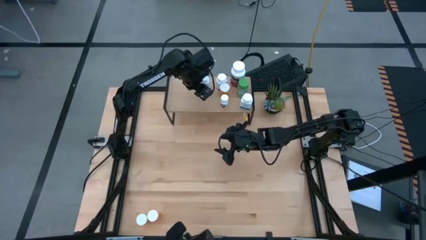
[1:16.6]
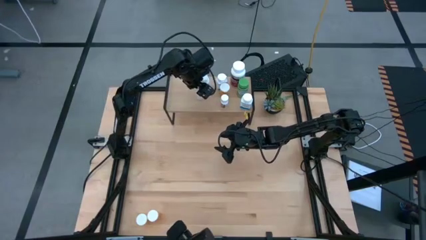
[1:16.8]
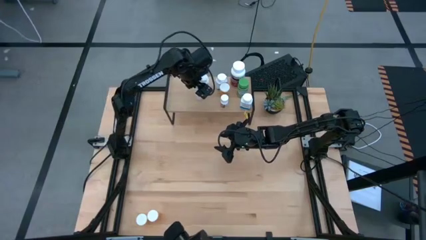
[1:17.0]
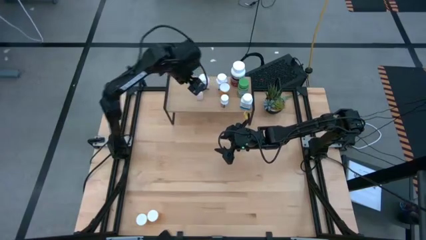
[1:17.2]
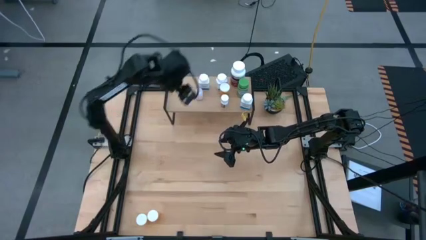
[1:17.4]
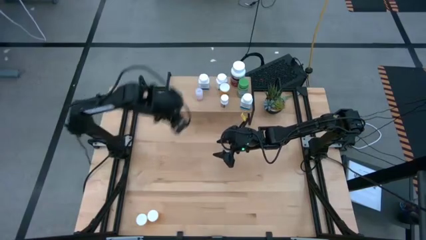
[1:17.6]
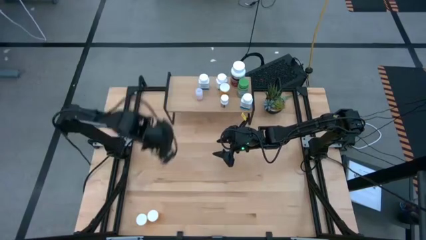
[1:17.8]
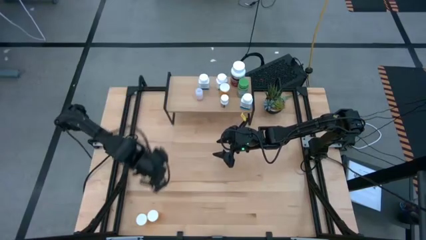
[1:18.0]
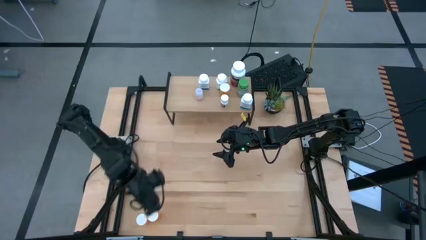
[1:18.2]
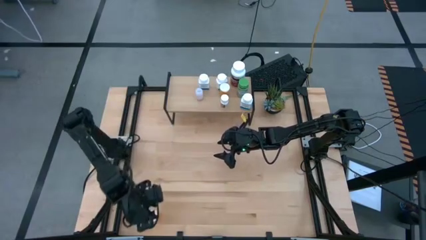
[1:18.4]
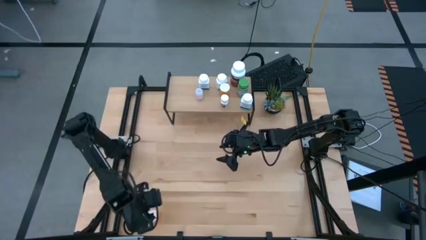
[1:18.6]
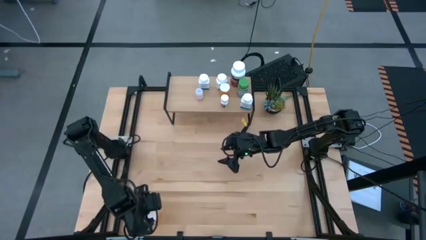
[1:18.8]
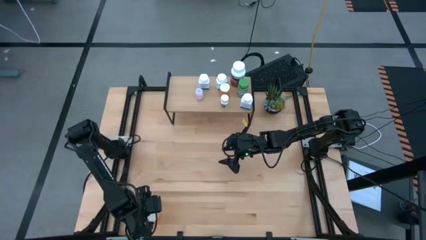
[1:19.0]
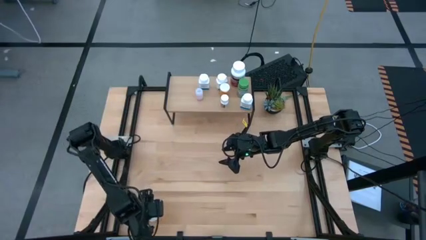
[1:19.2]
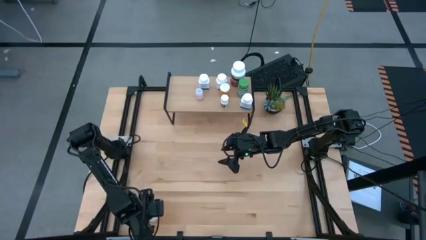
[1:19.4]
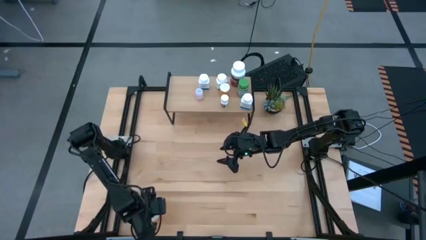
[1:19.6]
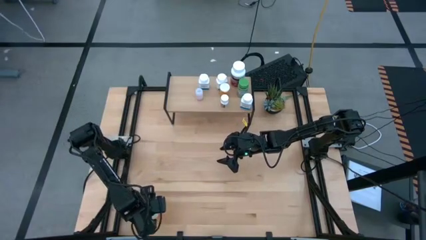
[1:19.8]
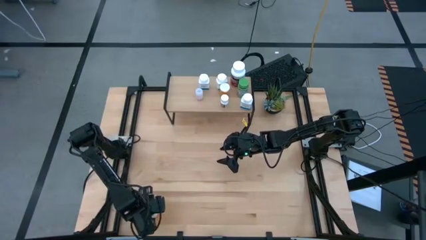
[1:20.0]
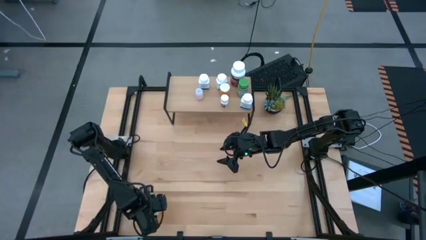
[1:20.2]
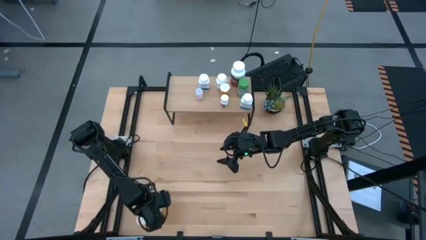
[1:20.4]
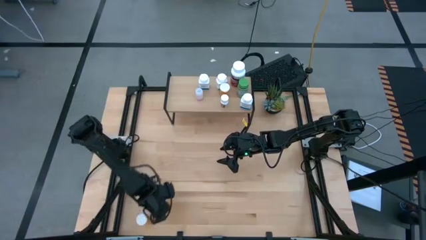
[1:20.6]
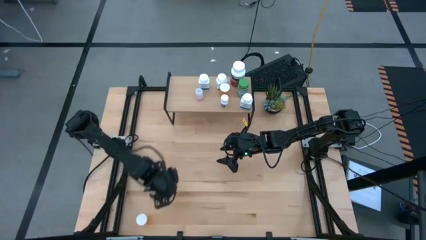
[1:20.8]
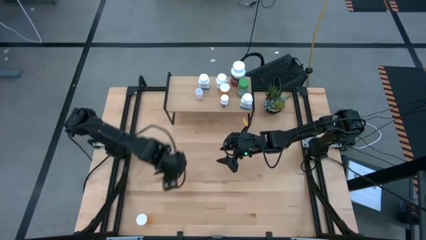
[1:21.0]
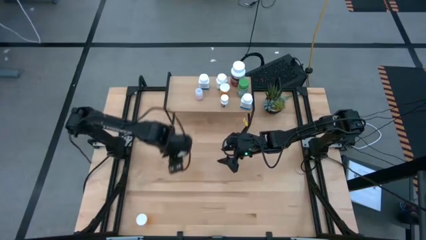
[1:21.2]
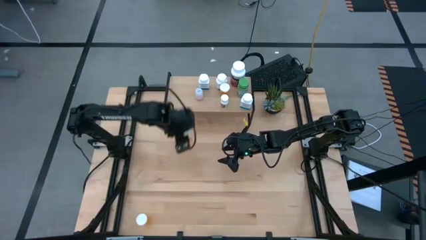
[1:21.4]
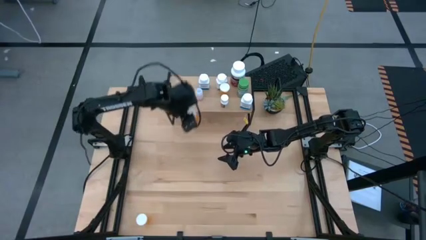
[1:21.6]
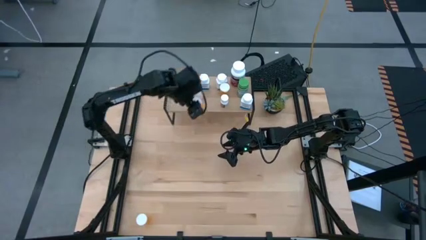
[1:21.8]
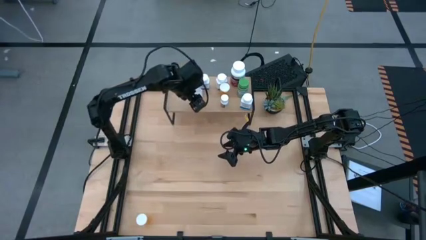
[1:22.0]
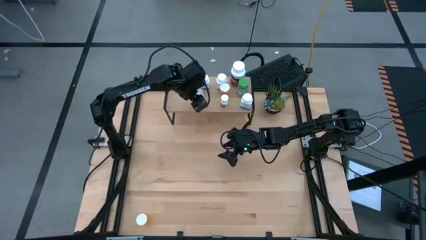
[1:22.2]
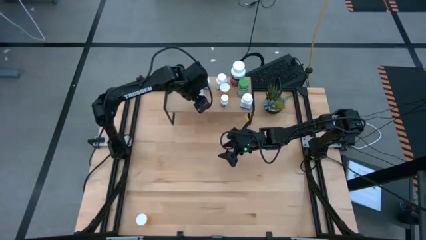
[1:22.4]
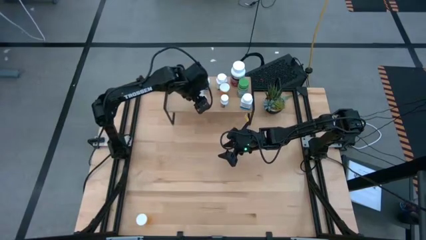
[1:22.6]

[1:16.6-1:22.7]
Task: Pick and place medicine bottles onto shelf by color
Put the right orange pill bottle on the shelf

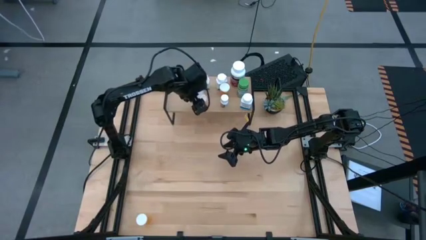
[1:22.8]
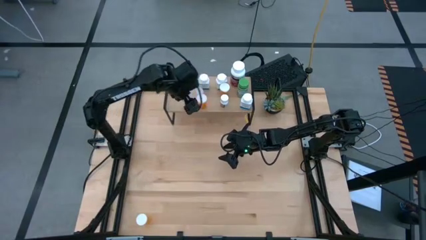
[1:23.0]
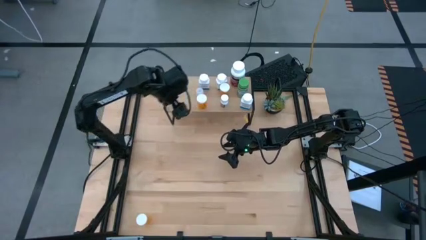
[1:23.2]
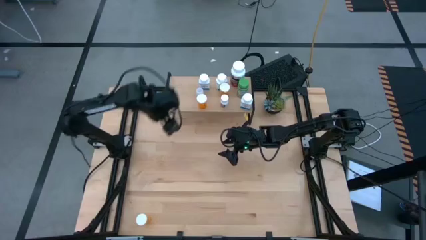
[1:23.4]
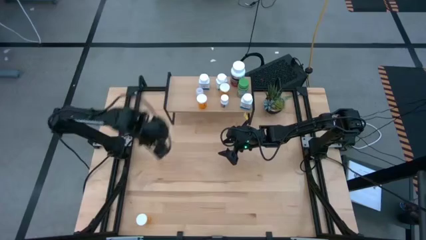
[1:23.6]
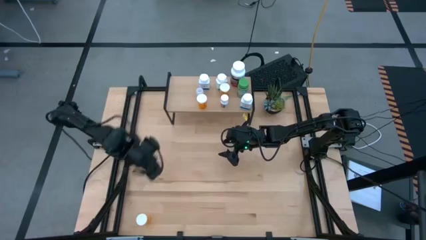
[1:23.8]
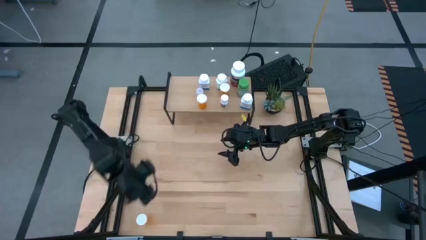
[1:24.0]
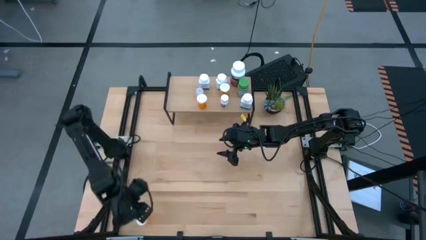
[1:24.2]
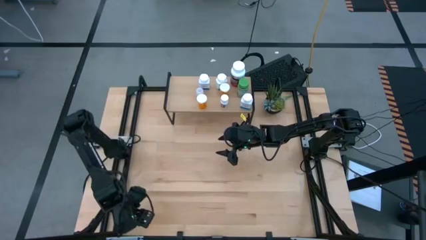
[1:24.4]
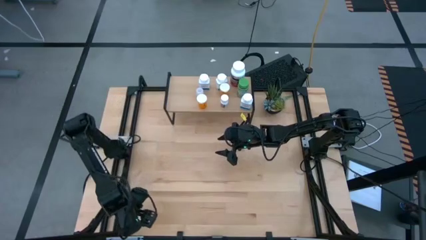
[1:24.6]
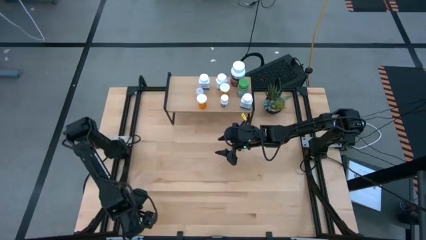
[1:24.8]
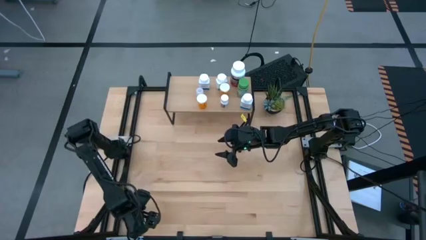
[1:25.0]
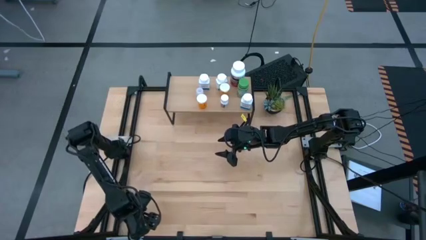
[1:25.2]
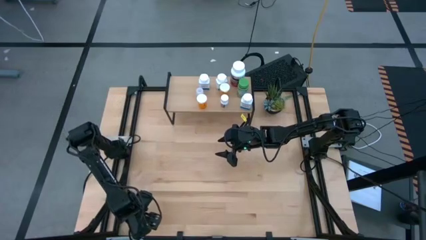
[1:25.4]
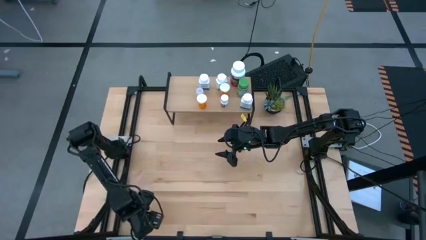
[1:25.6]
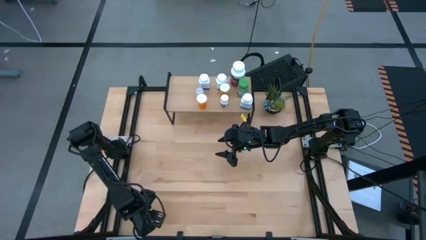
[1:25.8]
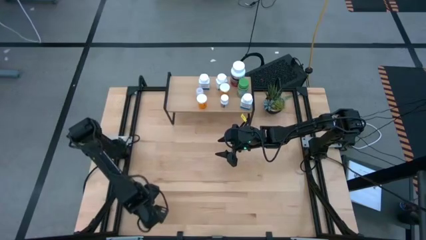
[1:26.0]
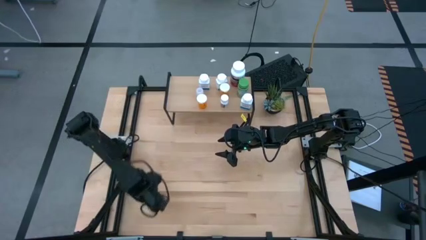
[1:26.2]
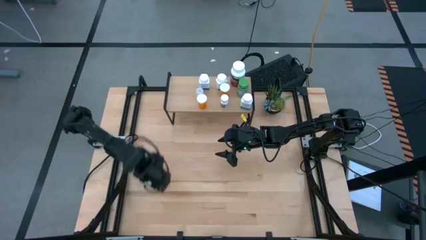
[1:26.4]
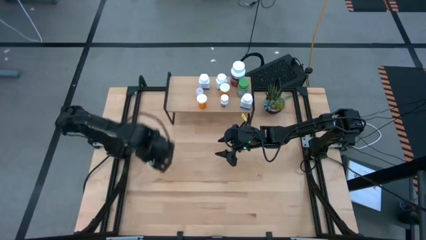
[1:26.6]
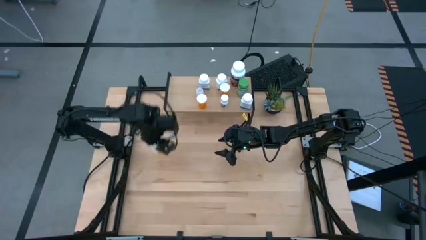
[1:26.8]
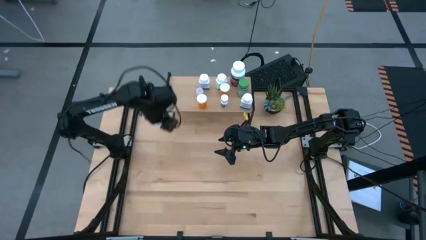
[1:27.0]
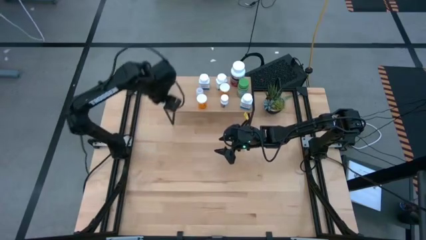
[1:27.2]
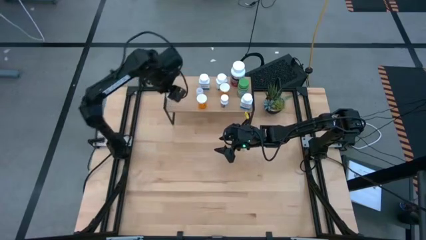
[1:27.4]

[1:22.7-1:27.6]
Put the orange pill bottle on the shelf

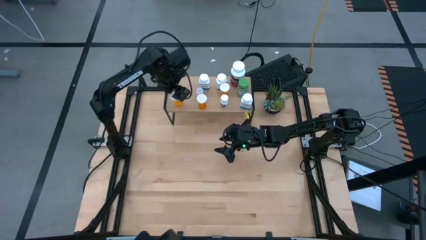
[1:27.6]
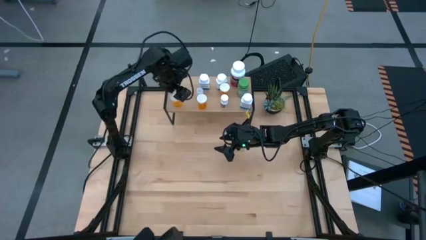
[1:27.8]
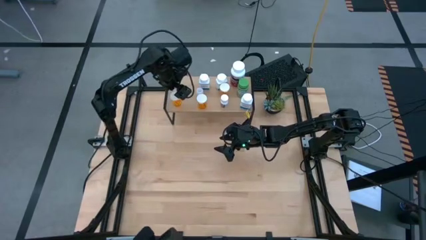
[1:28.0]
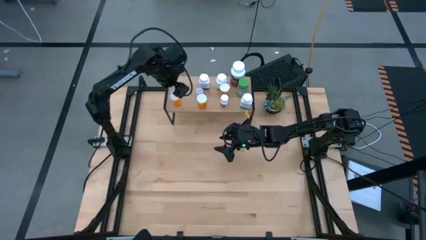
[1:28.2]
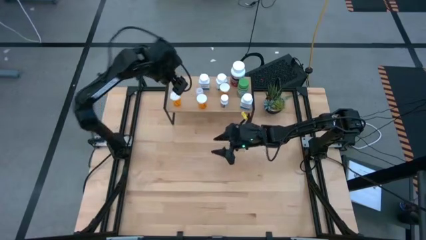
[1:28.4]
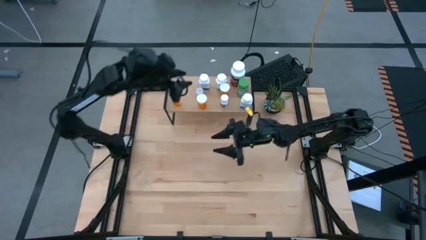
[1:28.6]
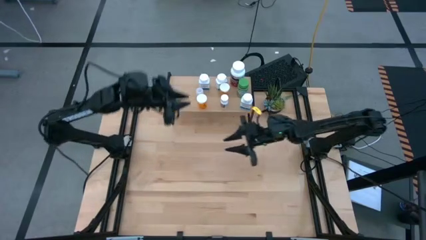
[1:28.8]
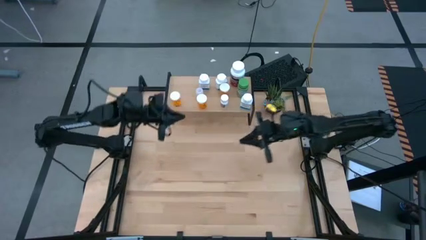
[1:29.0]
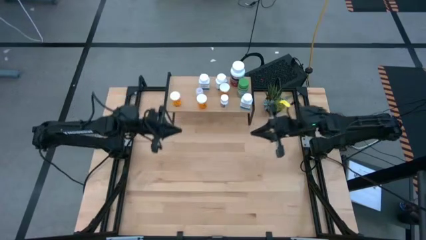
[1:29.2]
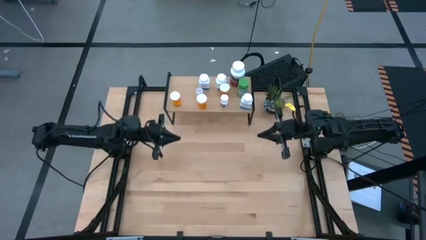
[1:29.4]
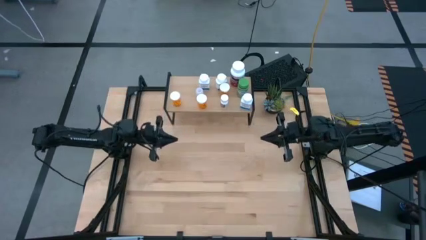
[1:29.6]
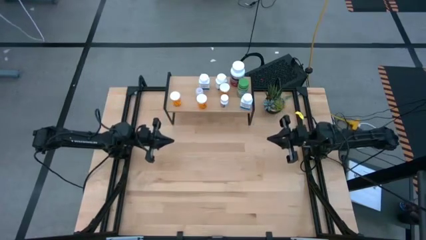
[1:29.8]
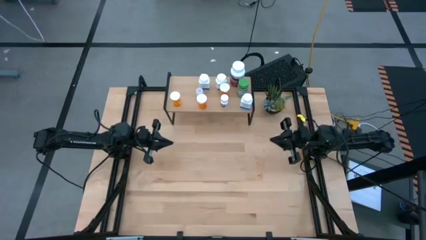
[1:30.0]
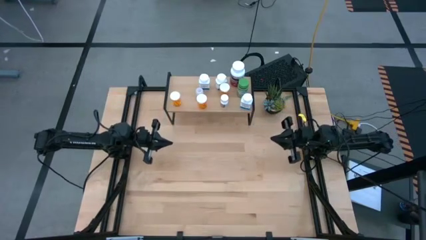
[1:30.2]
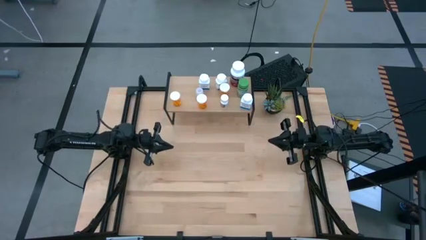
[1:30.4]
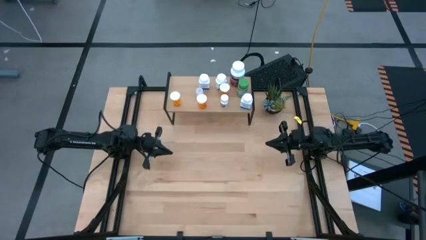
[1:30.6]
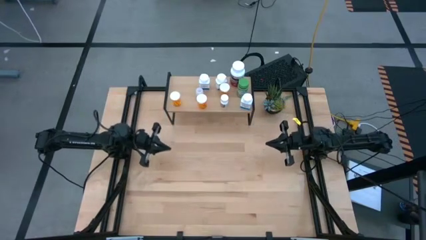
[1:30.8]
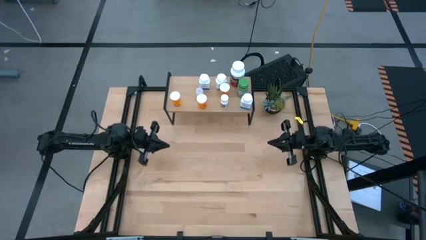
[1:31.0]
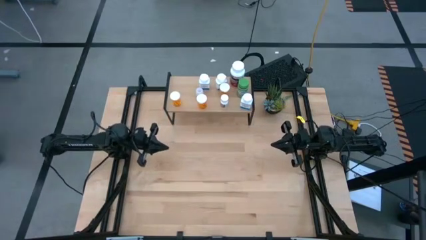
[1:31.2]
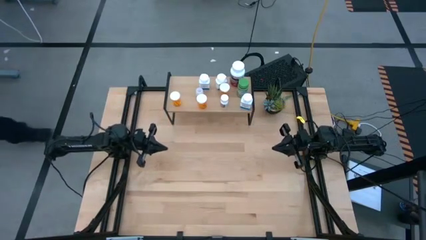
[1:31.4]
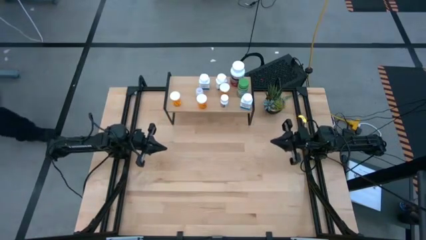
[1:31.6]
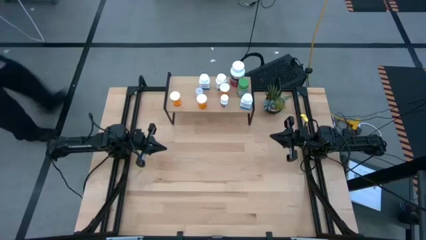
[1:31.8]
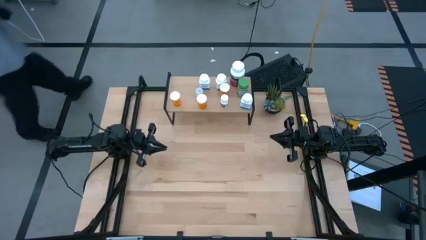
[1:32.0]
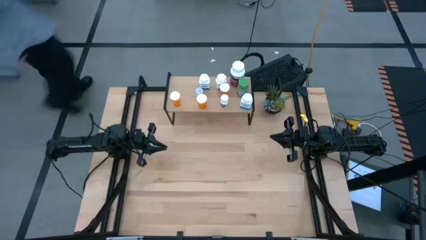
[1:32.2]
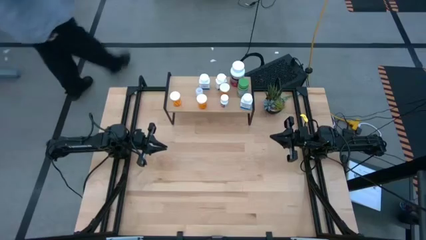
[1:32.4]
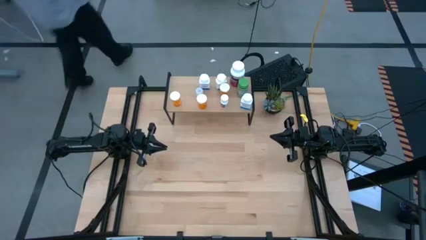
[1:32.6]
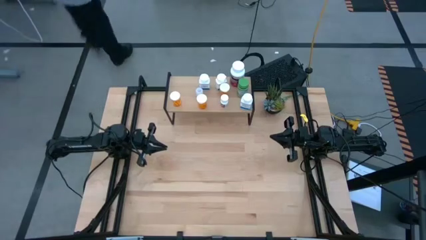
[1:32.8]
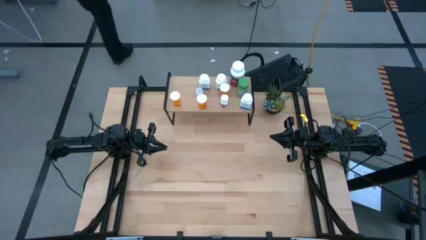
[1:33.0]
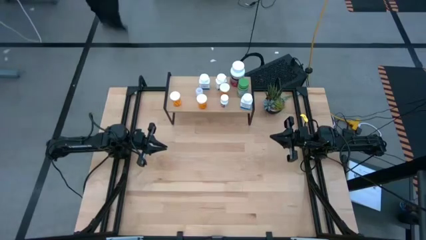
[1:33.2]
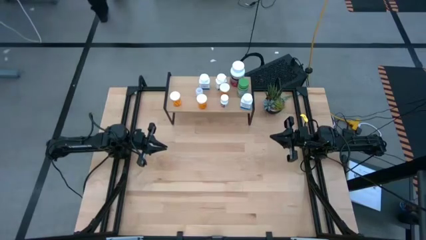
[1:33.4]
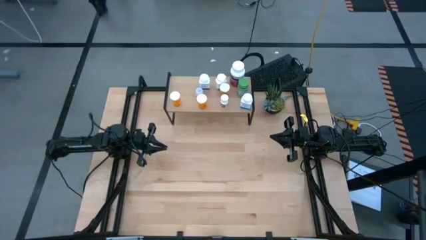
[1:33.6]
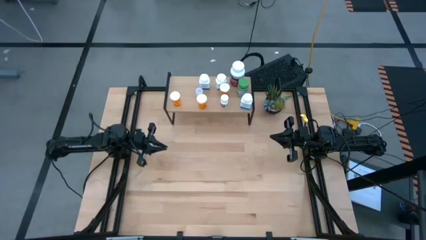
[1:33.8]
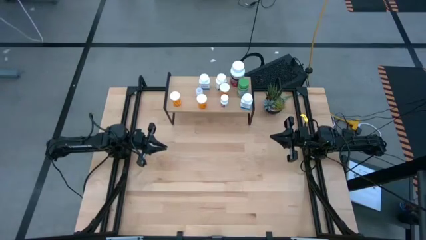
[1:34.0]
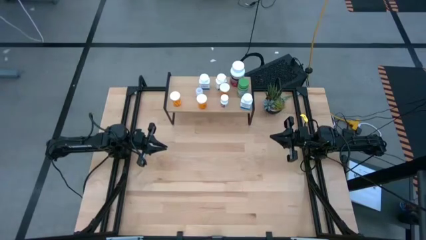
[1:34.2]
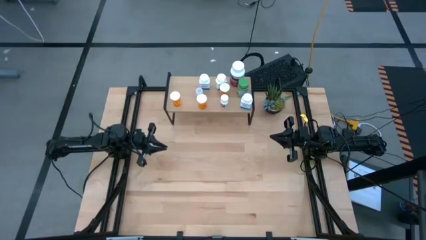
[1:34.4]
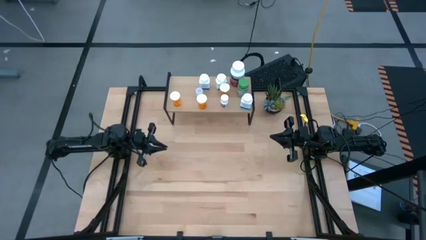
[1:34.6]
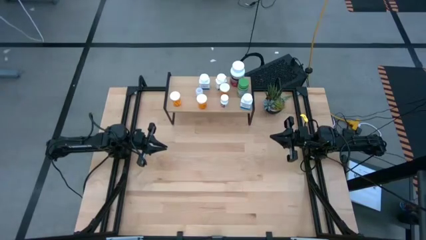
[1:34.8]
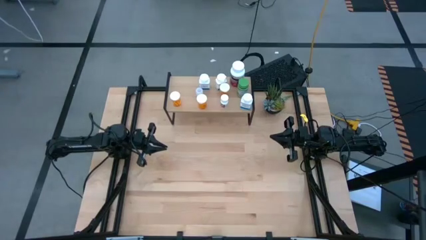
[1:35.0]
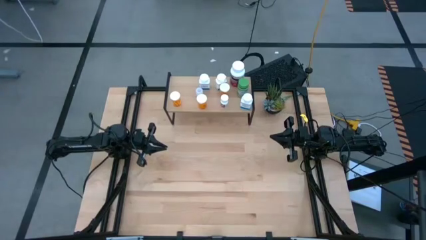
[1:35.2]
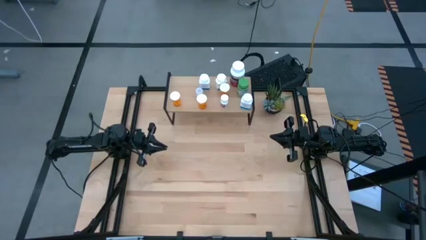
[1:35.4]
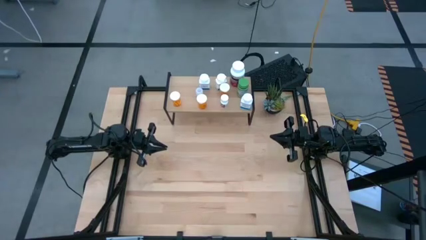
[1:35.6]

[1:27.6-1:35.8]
Return to Home Position
